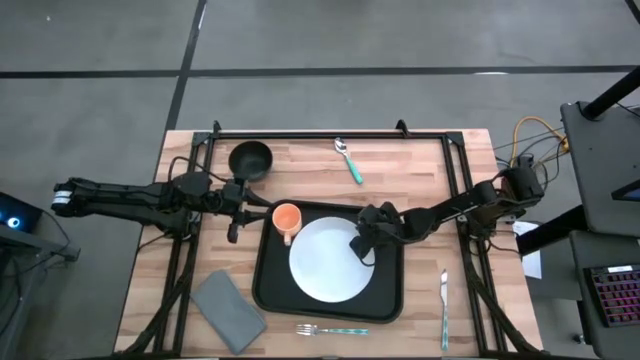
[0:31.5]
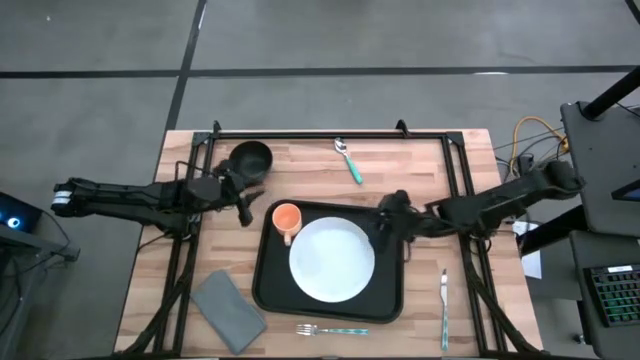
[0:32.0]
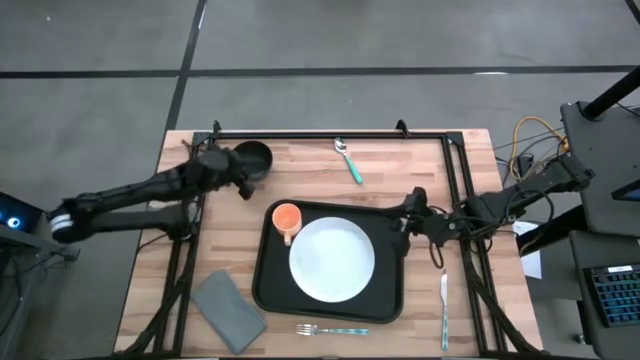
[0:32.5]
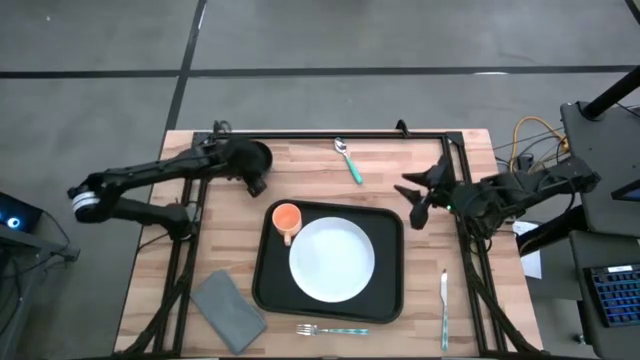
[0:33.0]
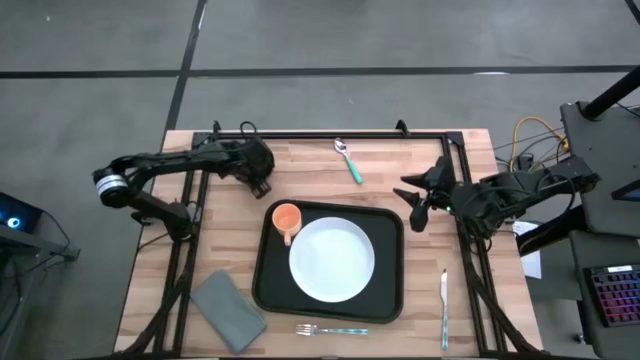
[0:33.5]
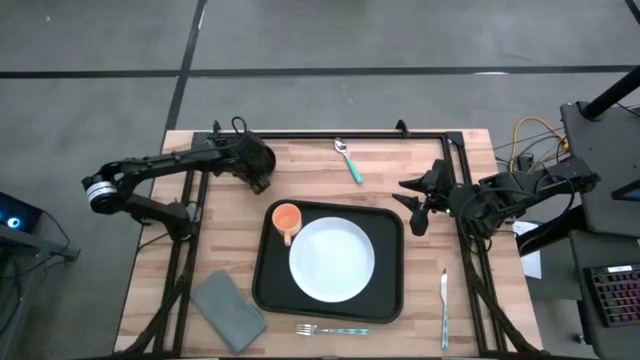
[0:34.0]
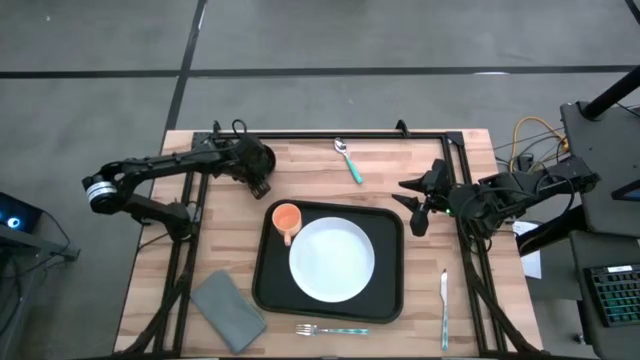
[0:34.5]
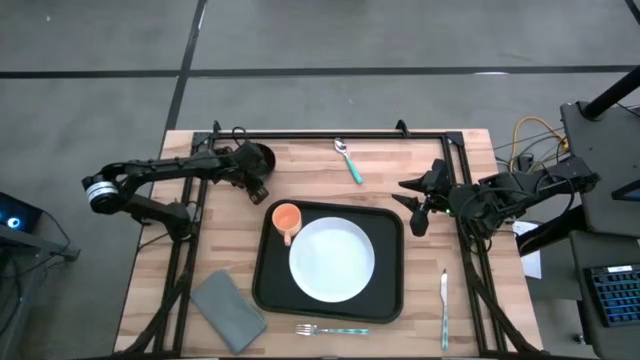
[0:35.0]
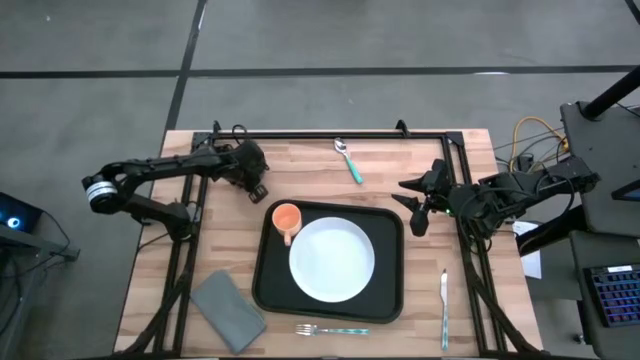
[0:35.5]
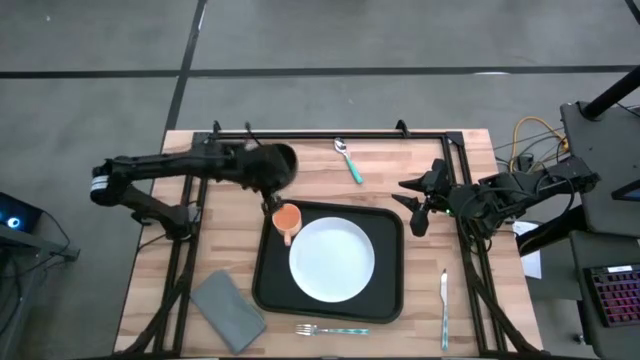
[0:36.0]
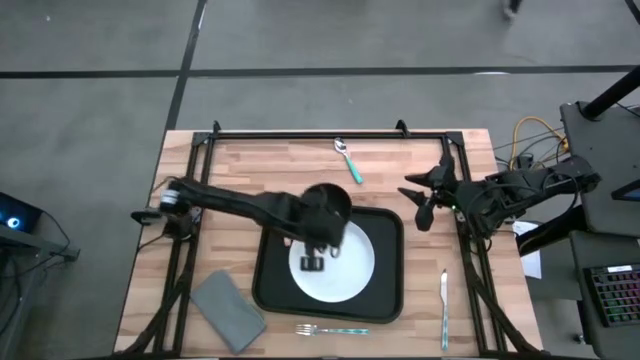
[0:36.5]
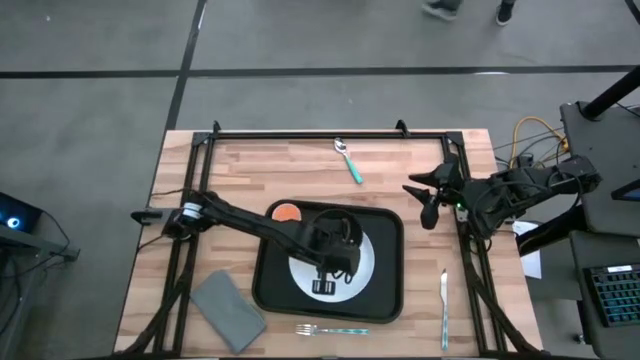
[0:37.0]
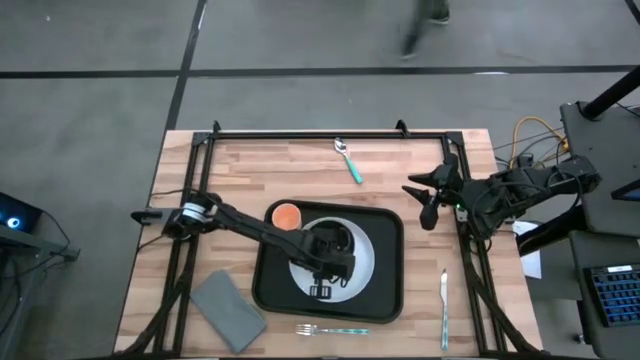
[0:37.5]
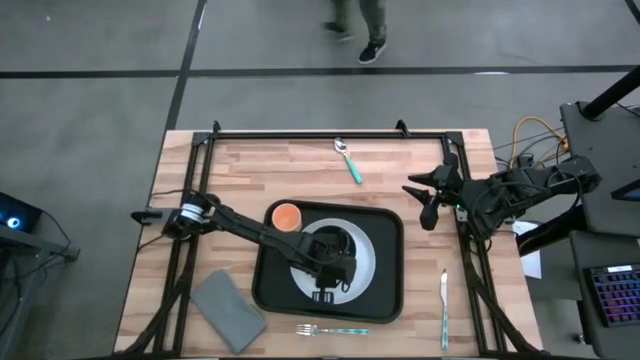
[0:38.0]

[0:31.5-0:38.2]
Task: Set up tray
Put the black bowl on top of the white plate

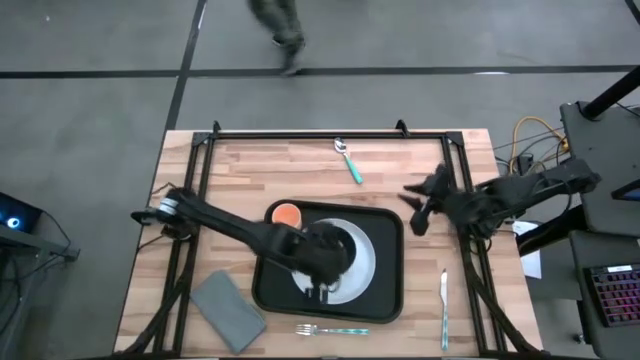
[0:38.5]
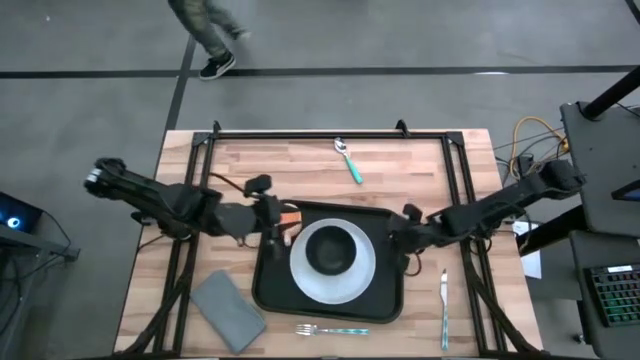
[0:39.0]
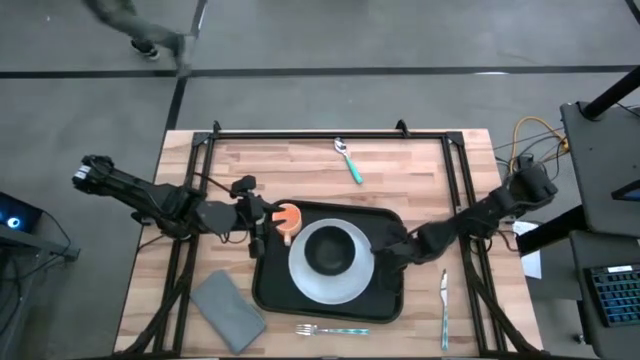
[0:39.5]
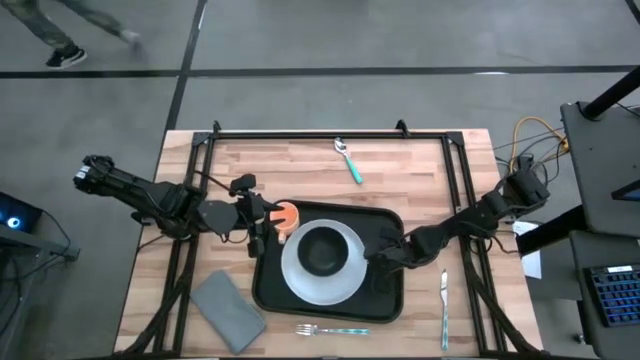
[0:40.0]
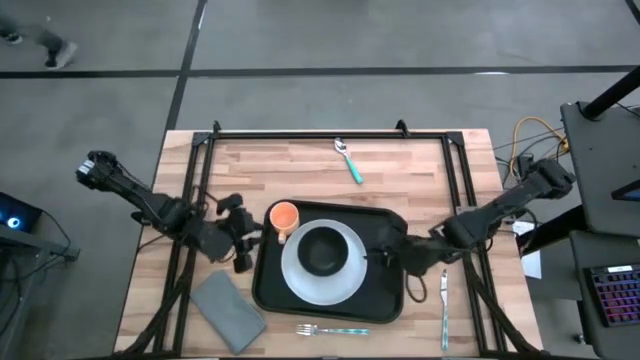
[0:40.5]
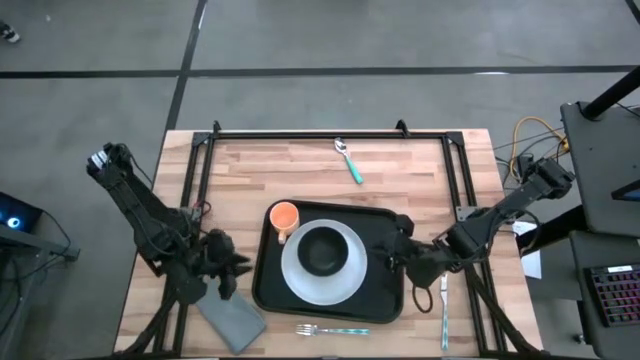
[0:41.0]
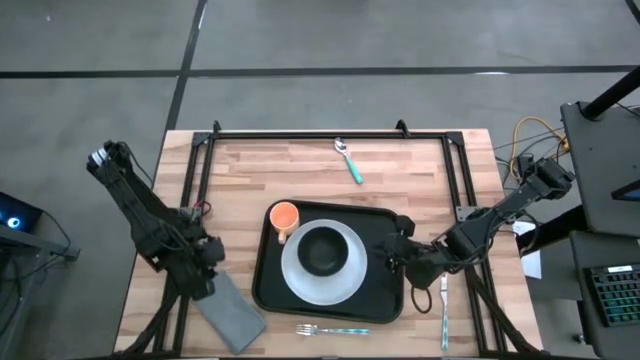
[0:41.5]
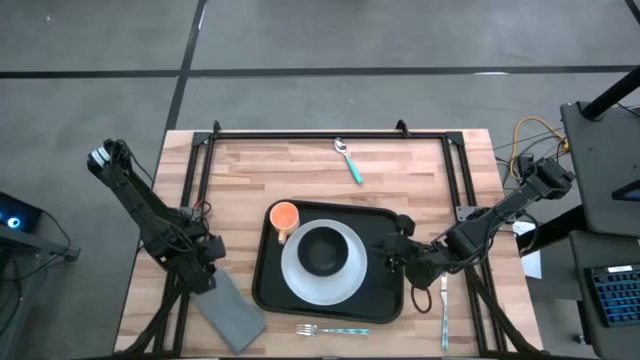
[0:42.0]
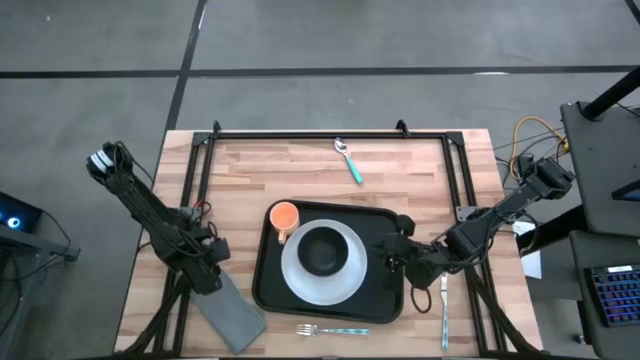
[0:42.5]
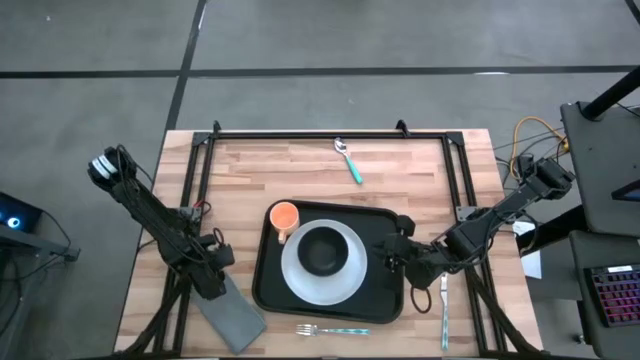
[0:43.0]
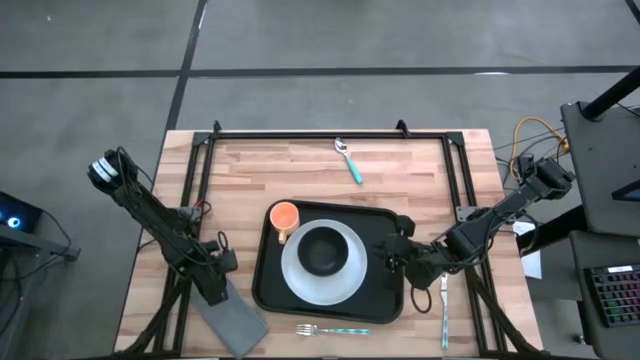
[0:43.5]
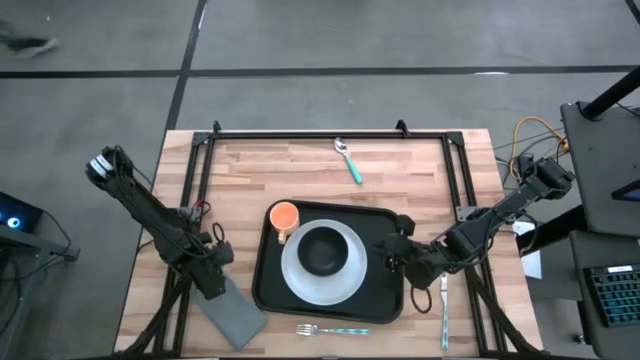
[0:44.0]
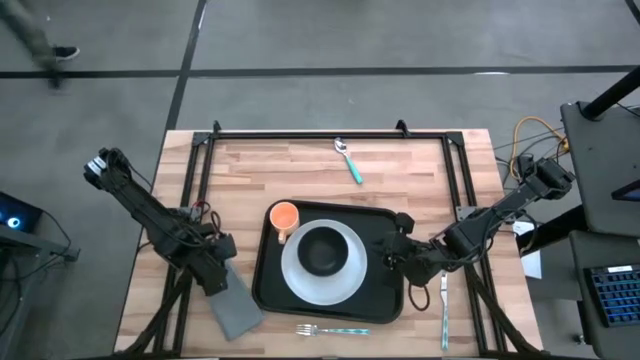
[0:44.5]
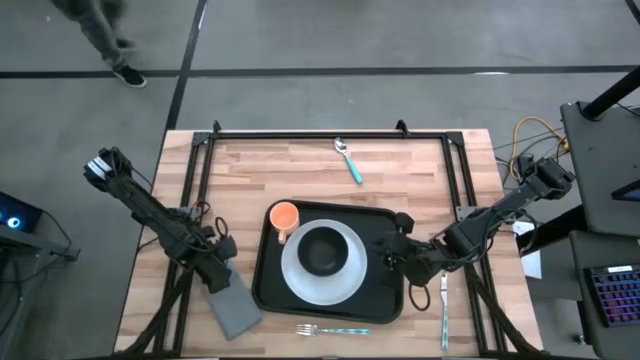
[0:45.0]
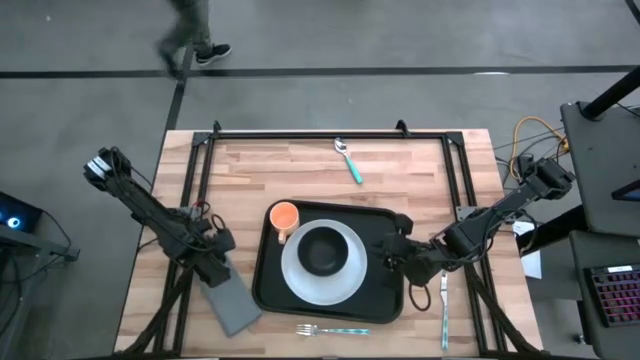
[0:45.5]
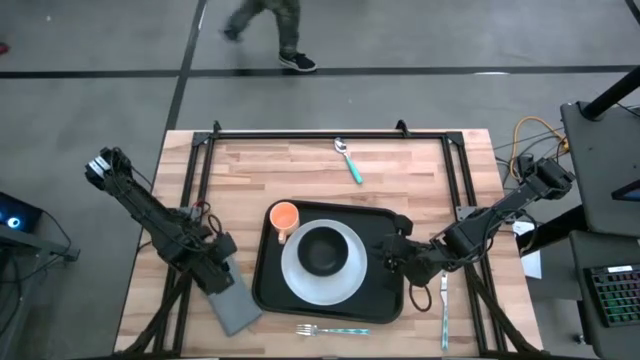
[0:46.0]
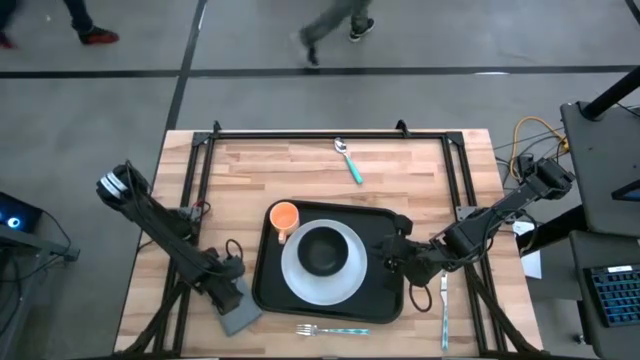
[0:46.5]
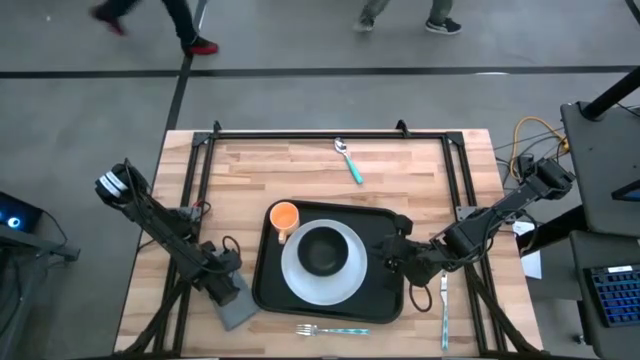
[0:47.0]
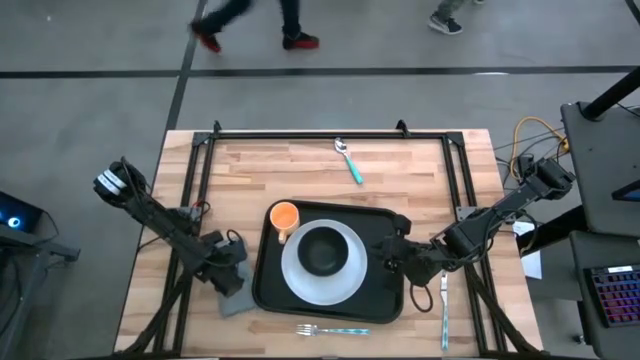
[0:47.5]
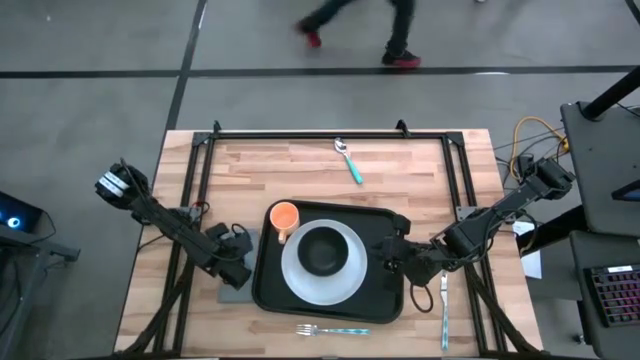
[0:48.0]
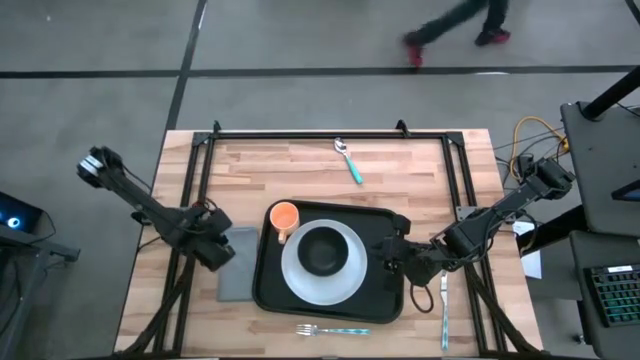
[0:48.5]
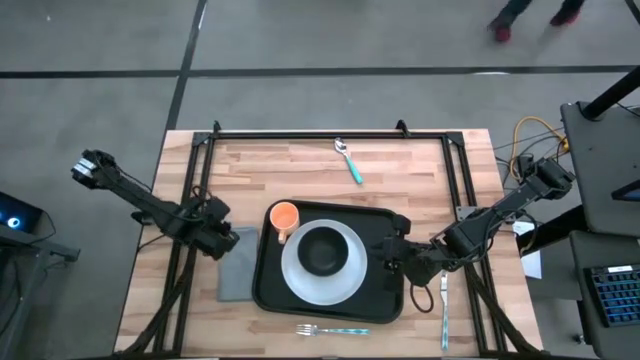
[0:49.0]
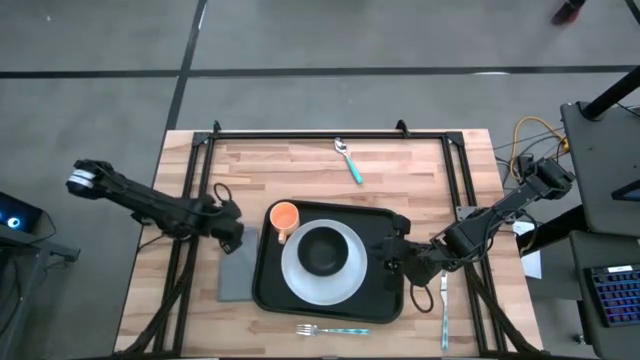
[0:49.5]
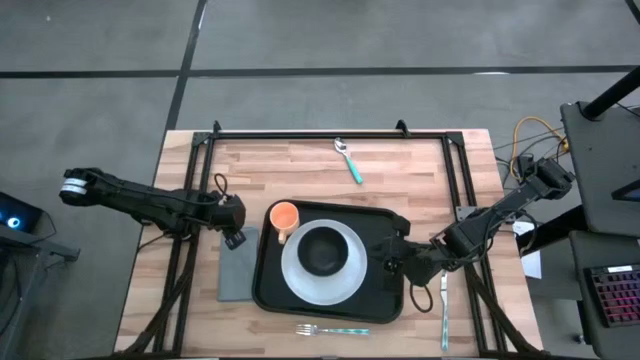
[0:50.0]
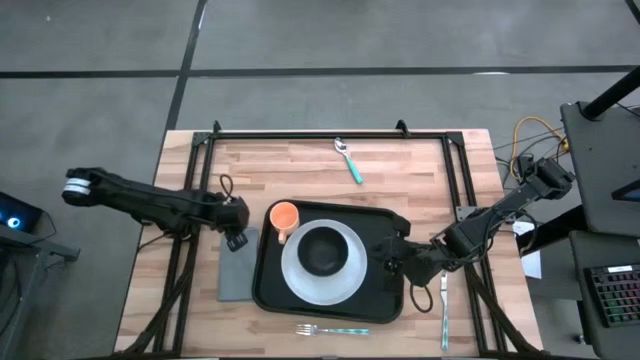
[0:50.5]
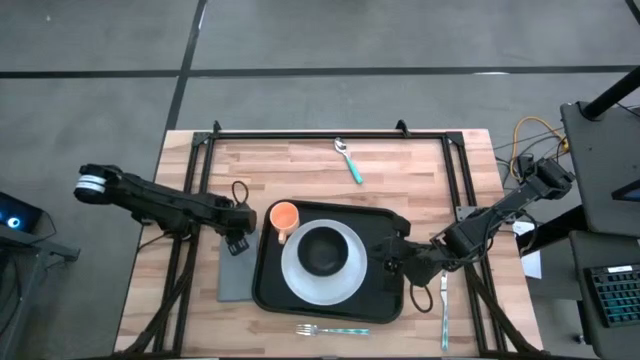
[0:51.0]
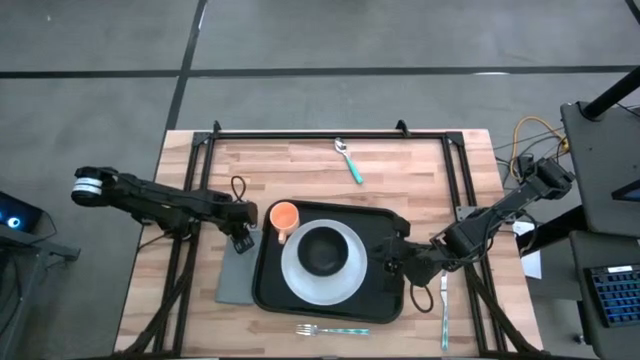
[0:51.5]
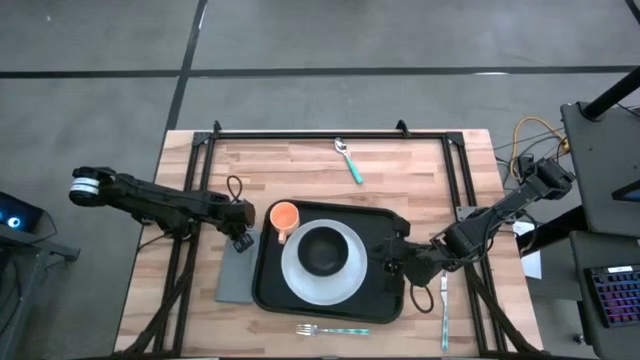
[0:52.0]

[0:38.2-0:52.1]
Put the gray napkin on the black tray to the right of the white plate

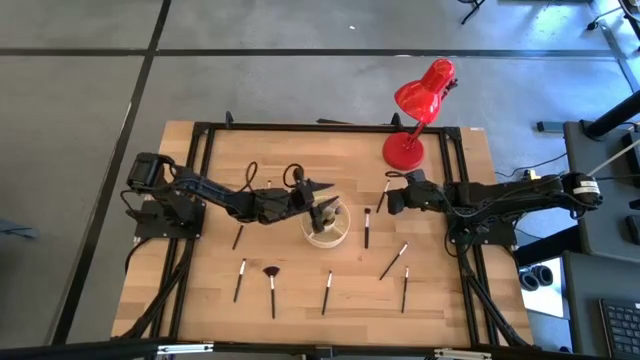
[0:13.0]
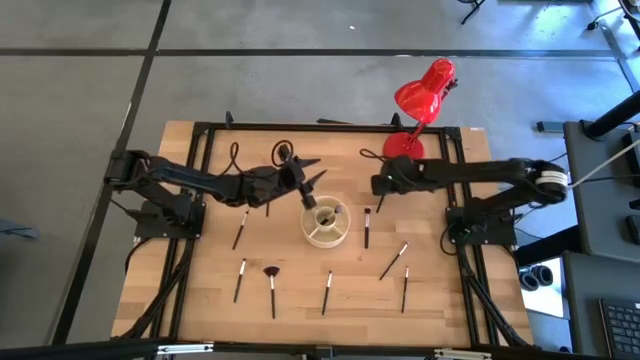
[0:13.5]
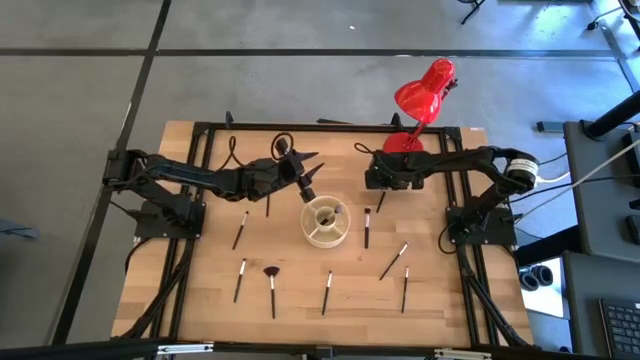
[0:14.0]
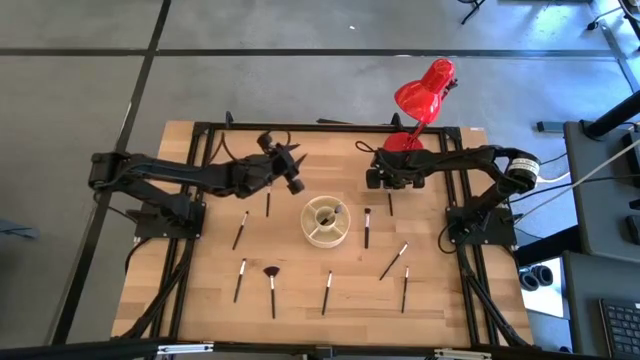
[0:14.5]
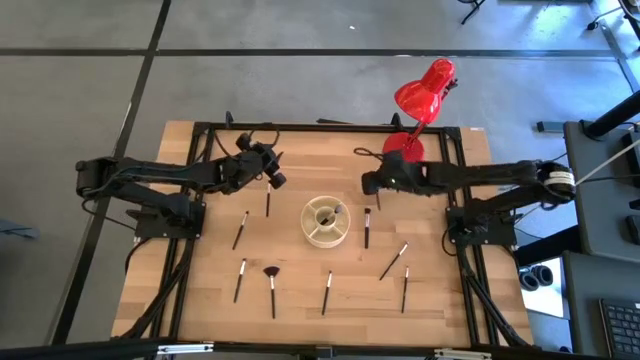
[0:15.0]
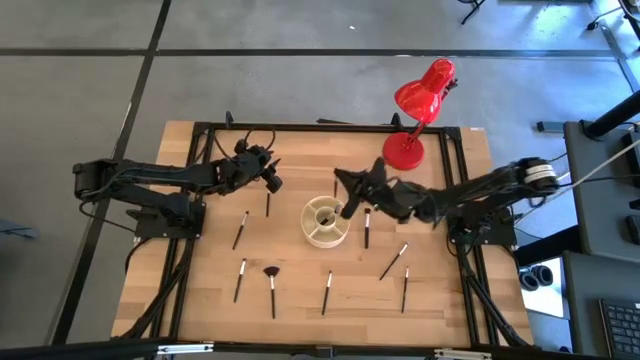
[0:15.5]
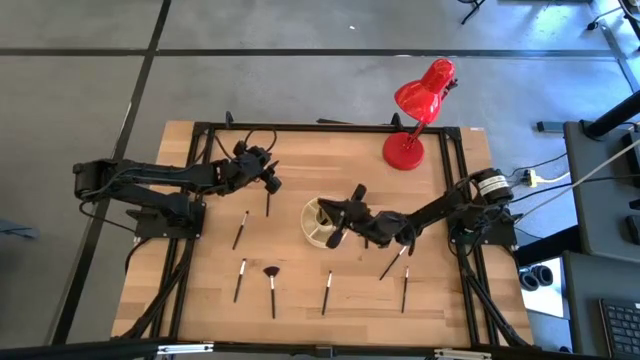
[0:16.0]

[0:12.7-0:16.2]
Task: Put items in baskets/containers
Put the black eyeshadow brush into the white brush holder
